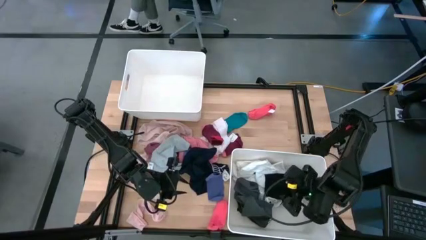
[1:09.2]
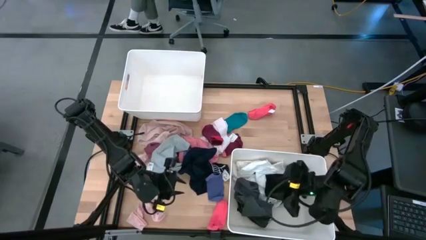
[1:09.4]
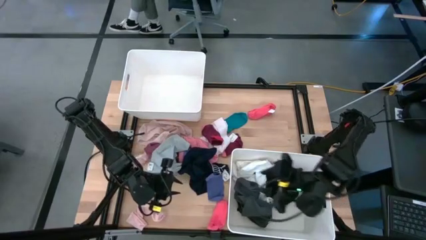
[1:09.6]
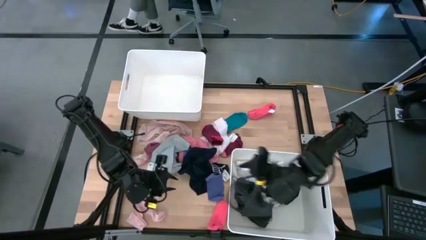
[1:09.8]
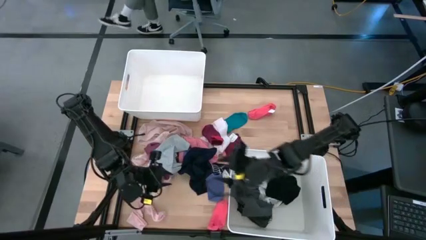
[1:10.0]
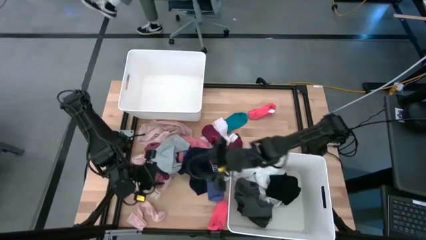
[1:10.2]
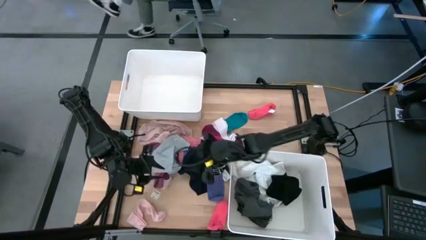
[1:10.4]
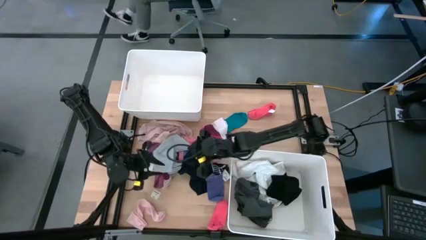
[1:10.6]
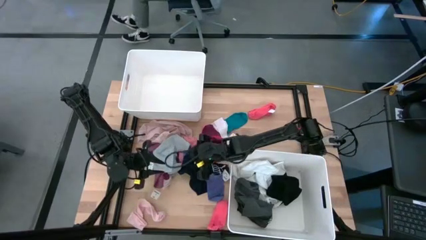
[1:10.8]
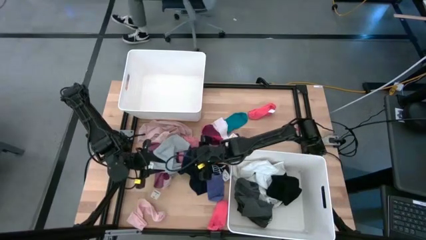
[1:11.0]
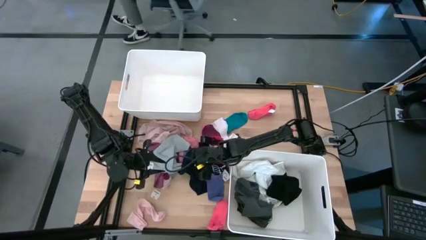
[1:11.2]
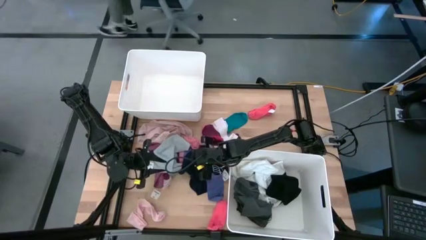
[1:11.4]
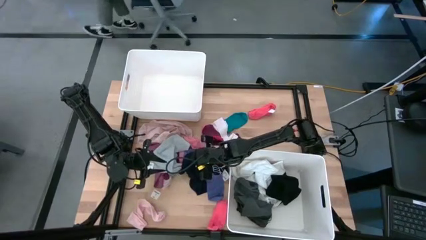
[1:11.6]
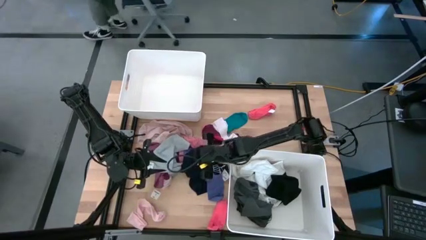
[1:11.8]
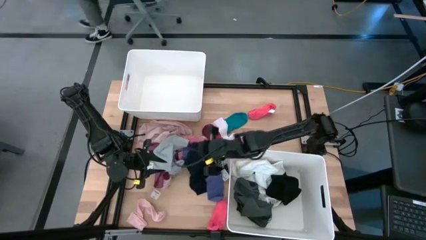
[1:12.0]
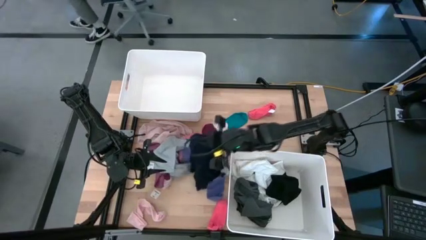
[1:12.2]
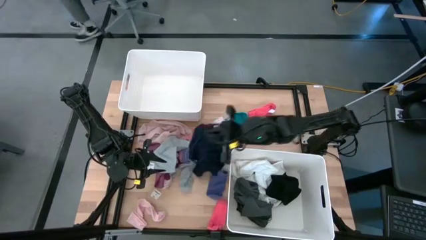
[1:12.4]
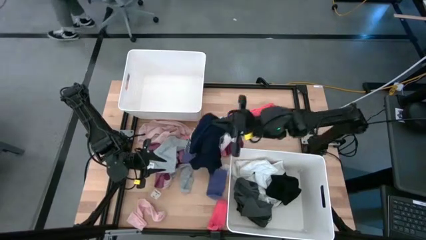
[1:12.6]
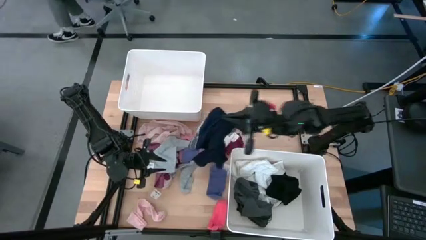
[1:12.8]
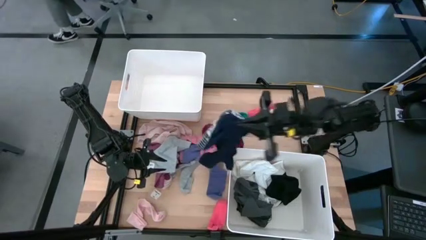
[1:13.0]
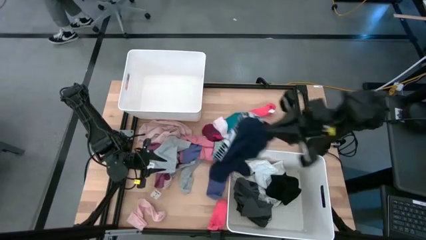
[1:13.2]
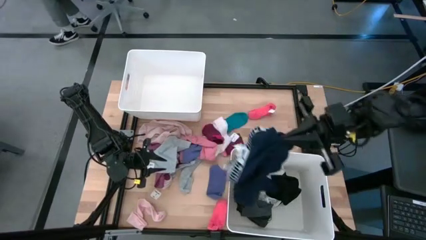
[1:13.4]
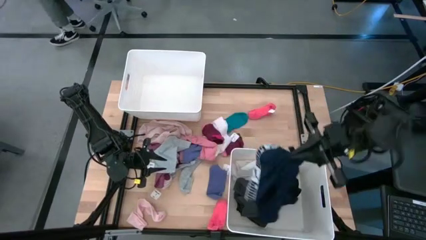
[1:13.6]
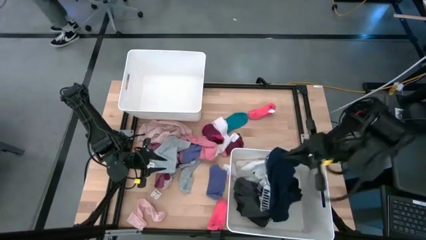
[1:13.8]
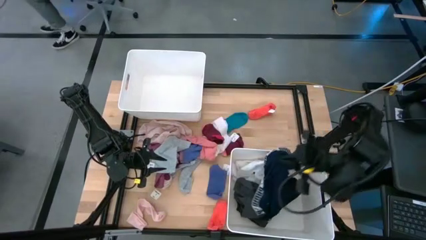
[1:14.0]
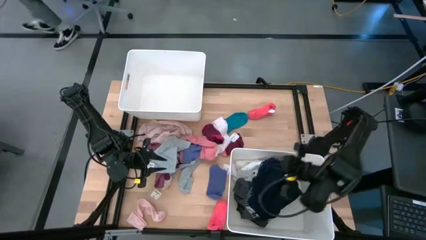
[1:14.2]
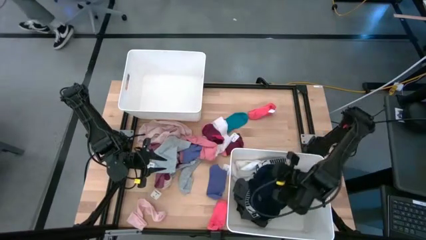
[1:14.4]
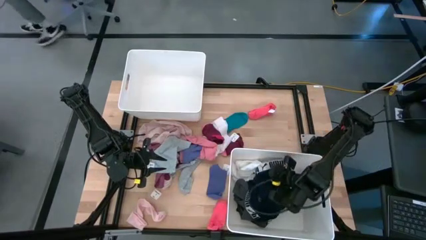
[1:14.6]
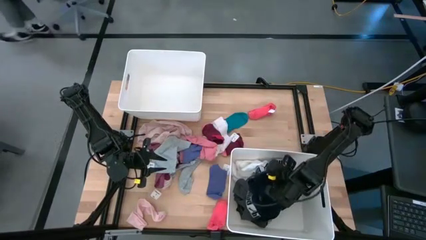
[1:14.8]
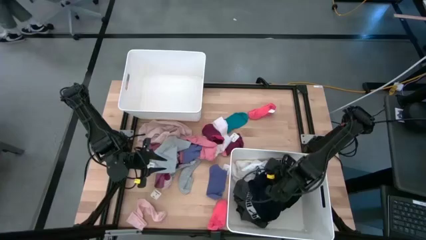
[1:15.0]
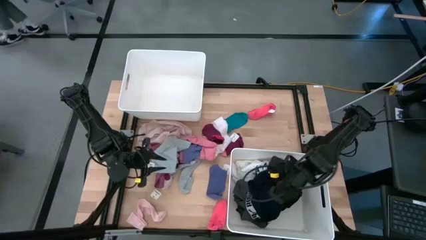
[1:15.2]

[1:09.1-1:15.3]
Task: Sort clothes
Put the dark blue underwear into the bottom white bin

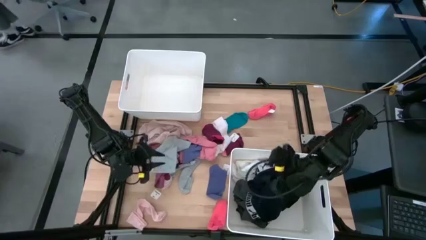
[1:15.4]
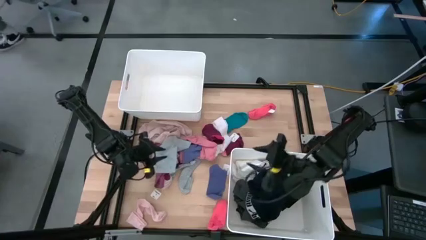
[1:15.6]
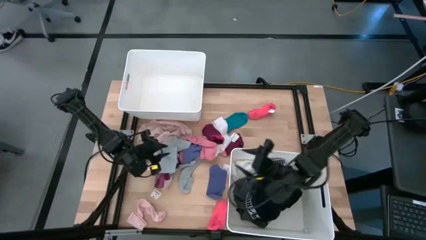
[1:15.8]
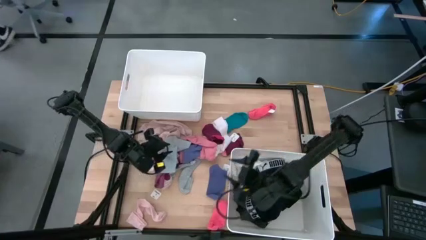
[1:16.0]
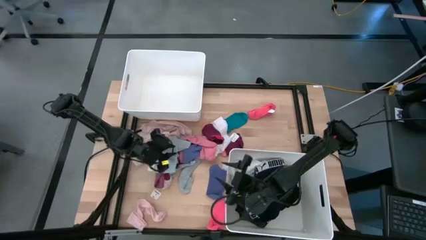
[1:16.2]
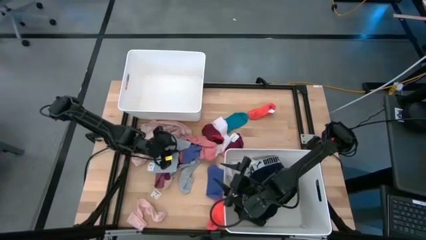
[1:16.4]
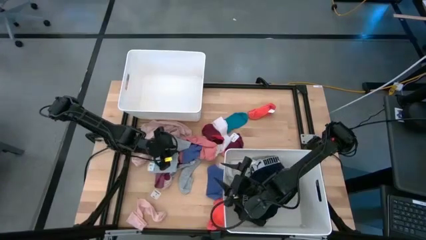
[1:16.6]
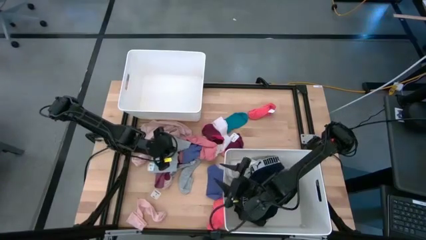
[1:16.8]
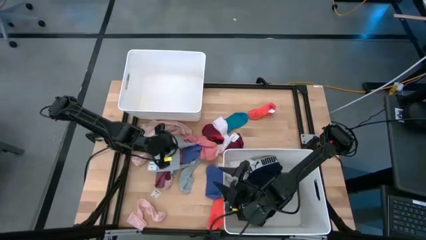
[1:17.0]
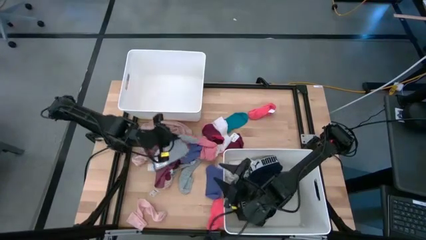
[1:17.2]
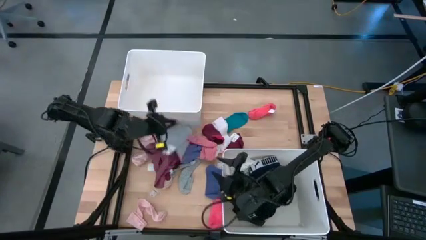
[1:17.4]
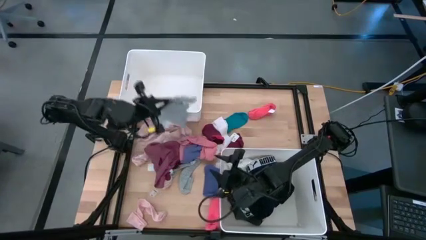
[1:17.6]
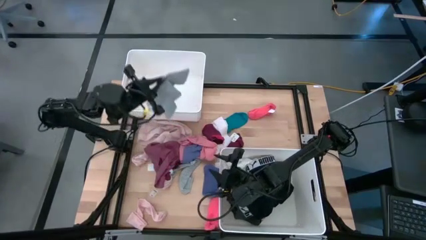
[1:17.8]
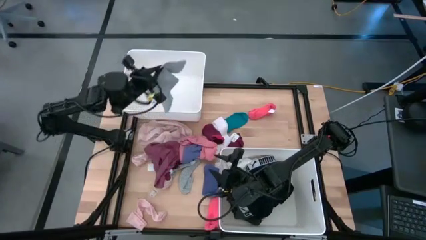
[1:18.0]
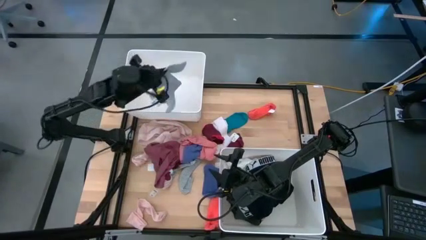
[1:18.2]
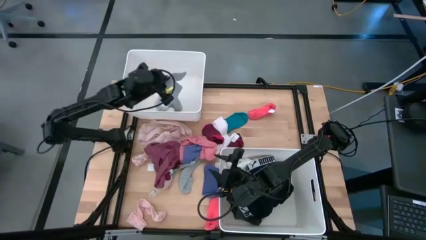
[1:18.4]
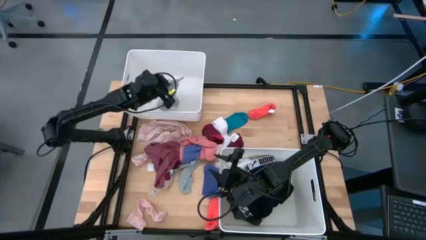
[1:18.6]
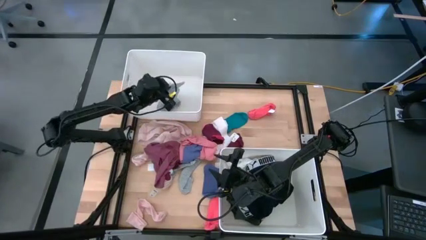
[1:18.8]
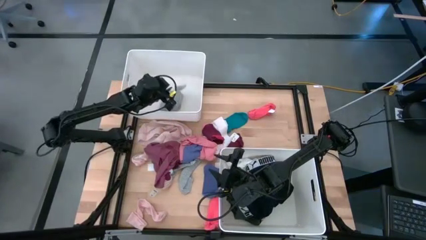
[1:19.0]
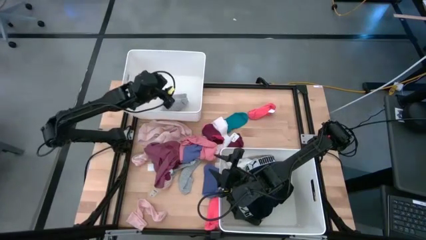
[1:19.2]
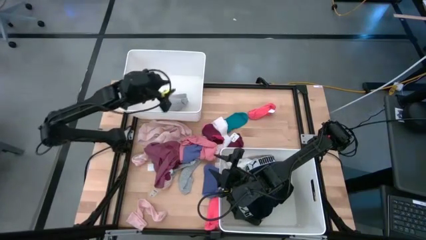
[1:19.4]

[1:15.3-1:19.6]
Put the gray underwear into the top white bin
